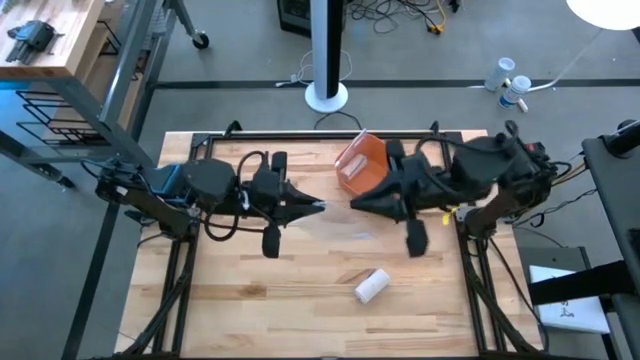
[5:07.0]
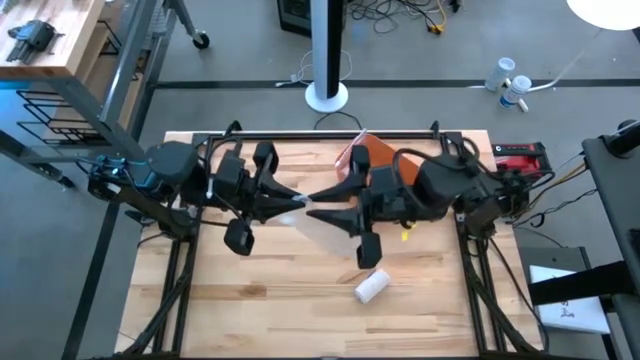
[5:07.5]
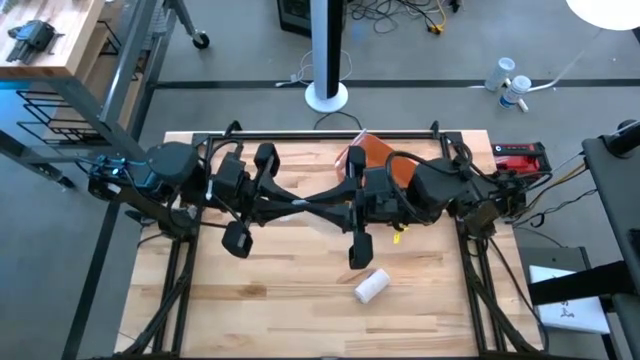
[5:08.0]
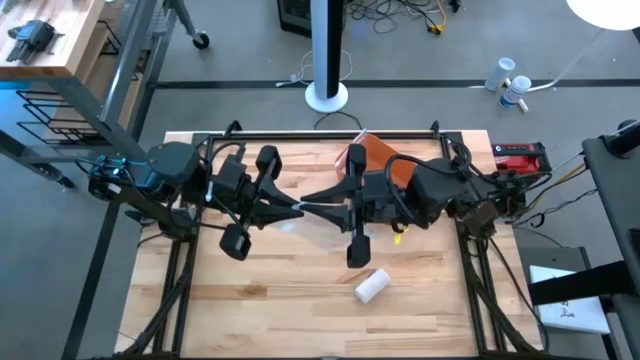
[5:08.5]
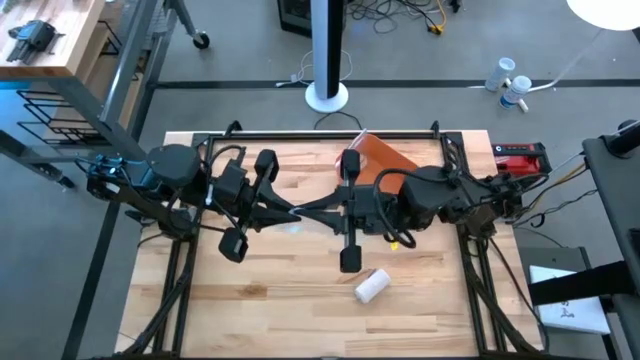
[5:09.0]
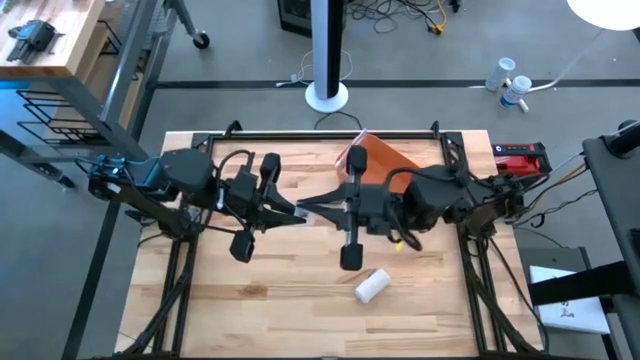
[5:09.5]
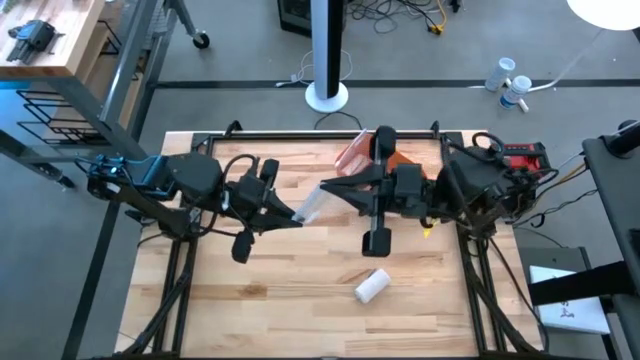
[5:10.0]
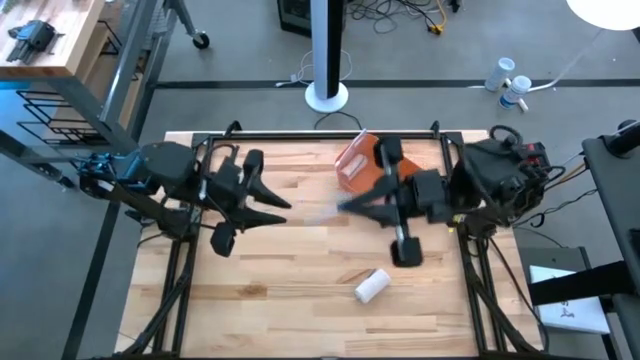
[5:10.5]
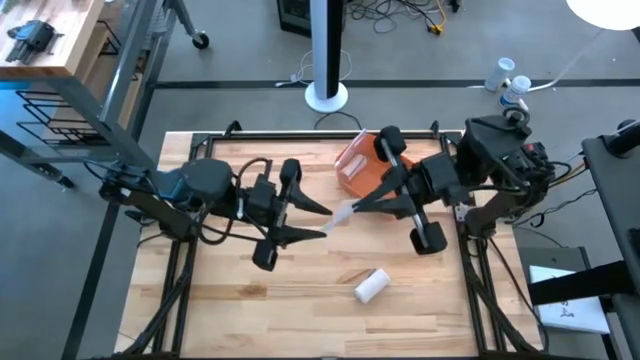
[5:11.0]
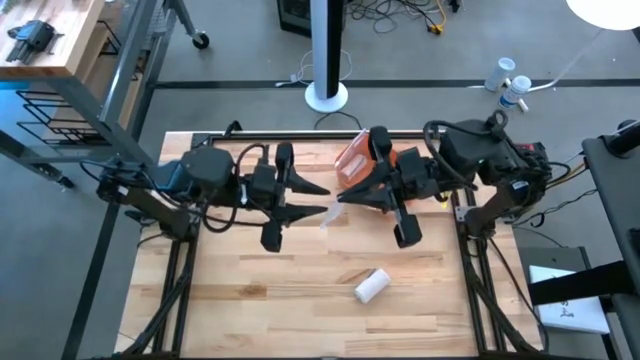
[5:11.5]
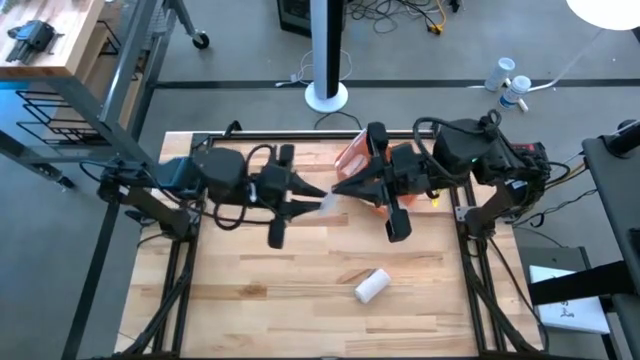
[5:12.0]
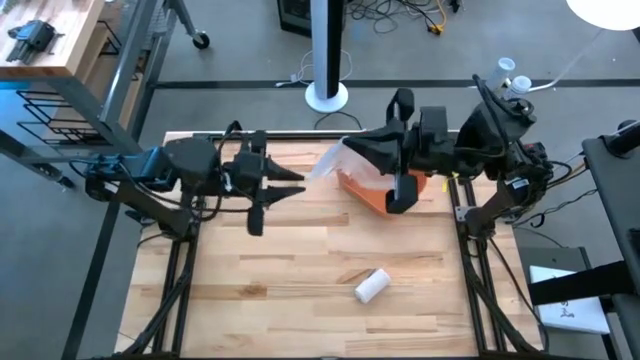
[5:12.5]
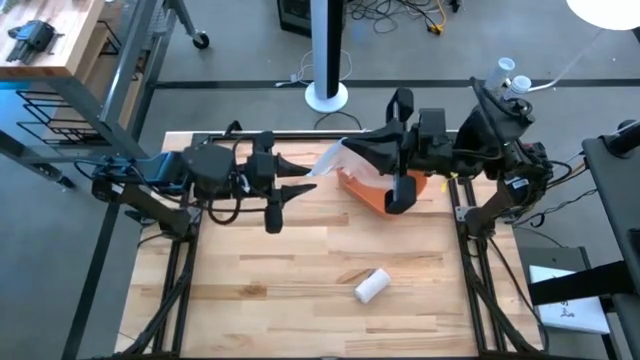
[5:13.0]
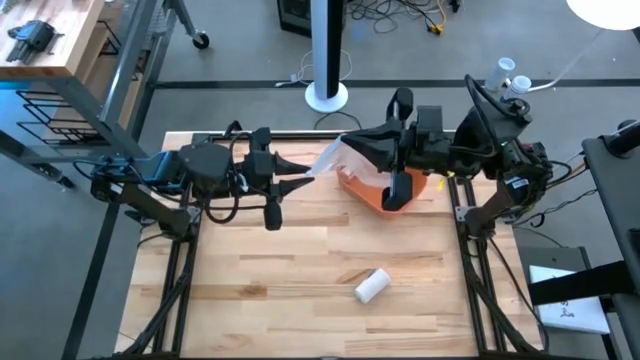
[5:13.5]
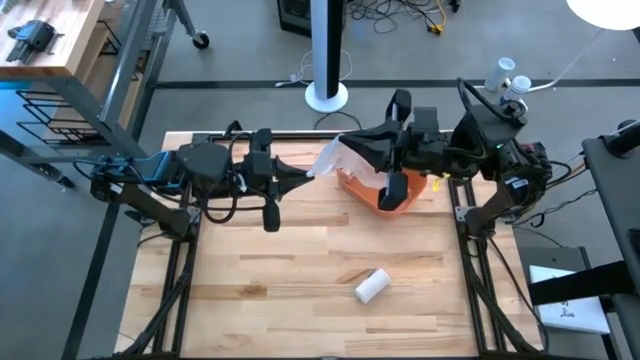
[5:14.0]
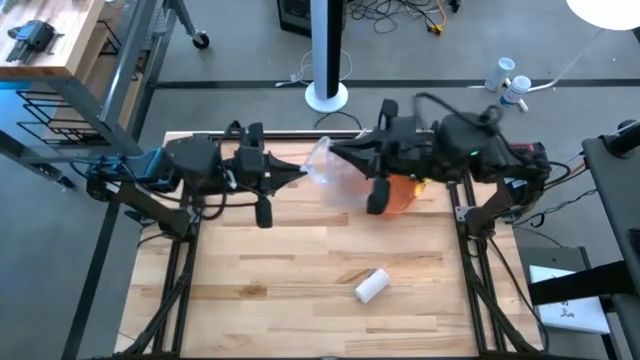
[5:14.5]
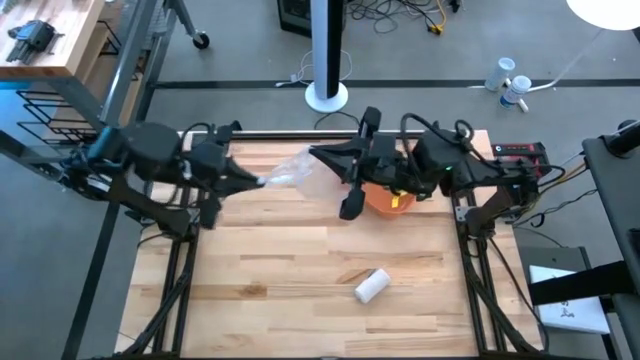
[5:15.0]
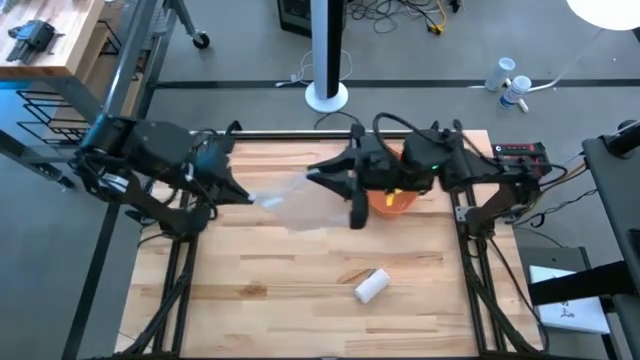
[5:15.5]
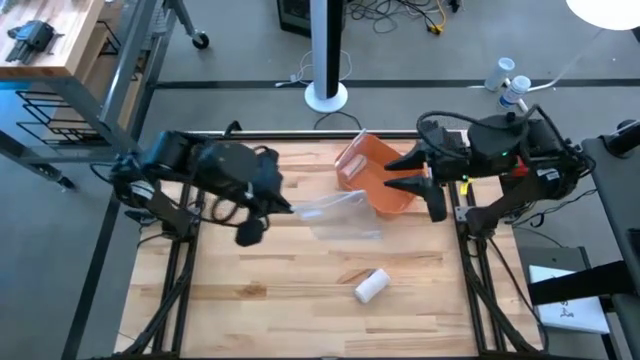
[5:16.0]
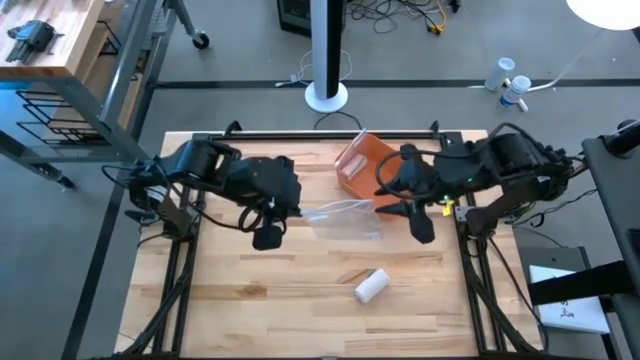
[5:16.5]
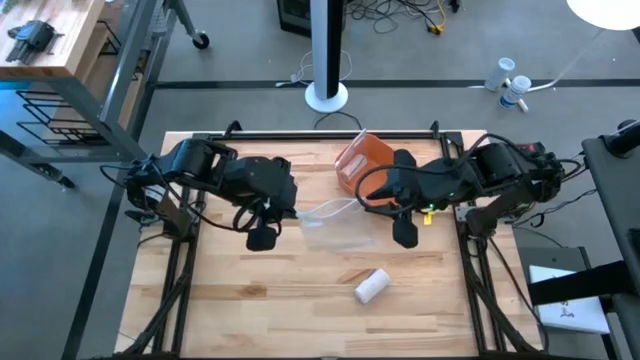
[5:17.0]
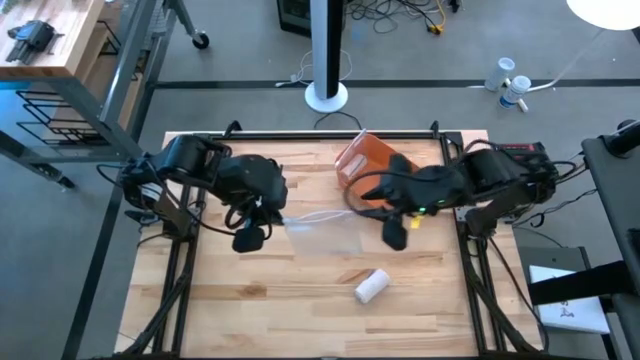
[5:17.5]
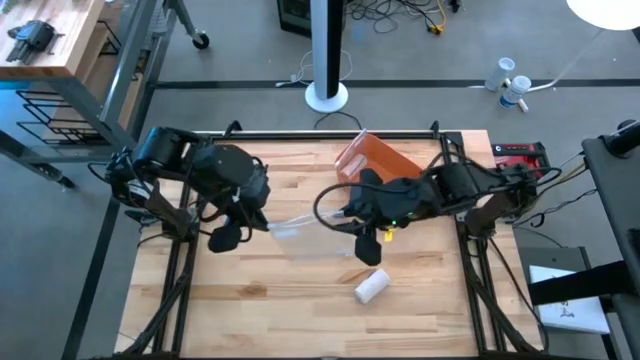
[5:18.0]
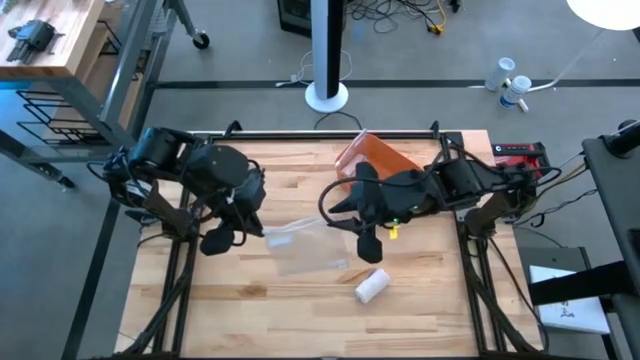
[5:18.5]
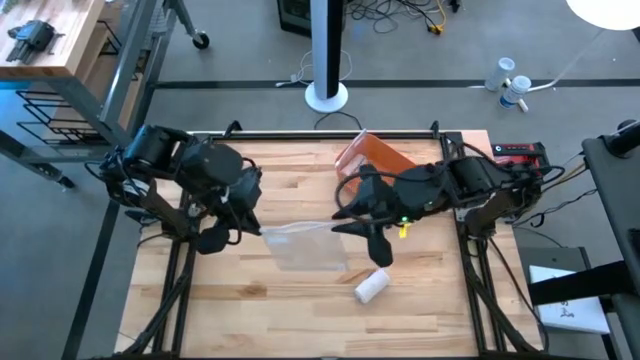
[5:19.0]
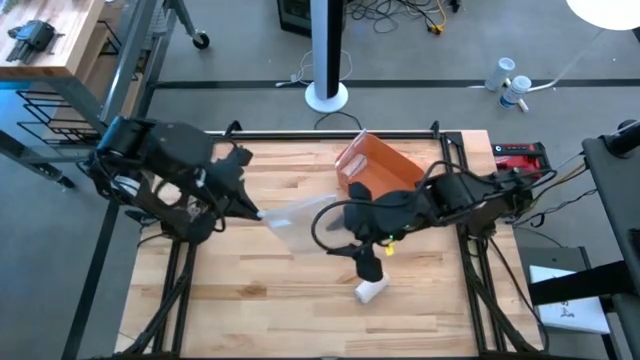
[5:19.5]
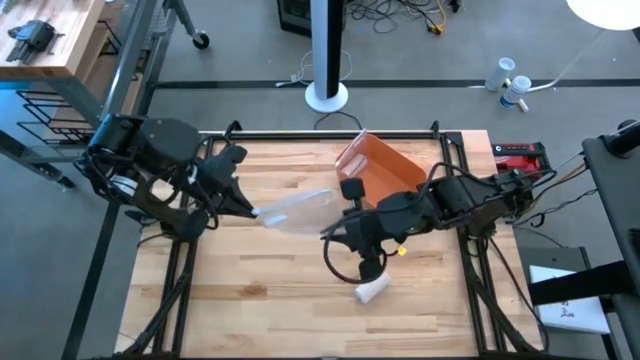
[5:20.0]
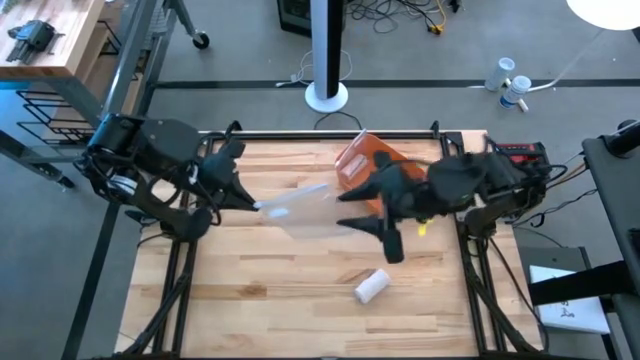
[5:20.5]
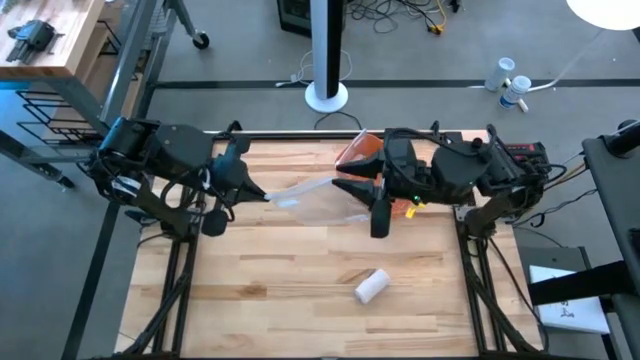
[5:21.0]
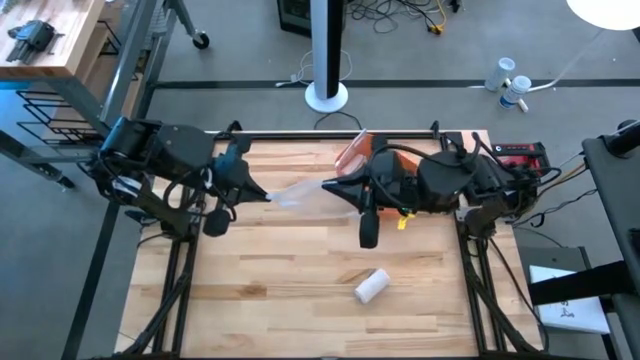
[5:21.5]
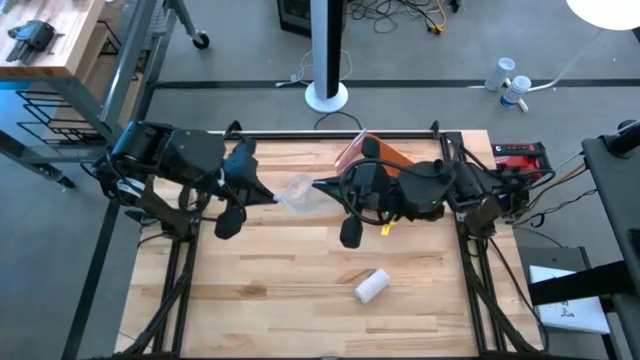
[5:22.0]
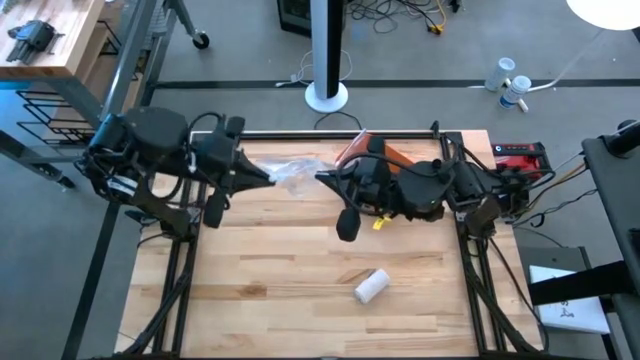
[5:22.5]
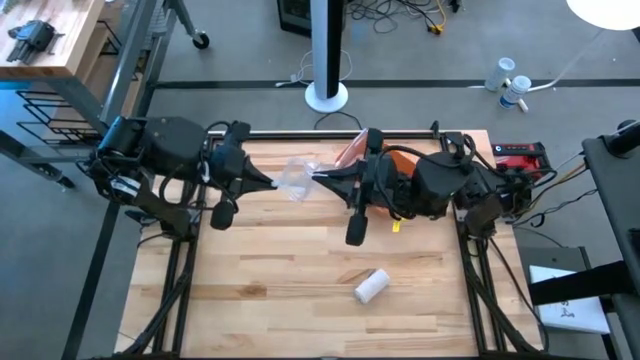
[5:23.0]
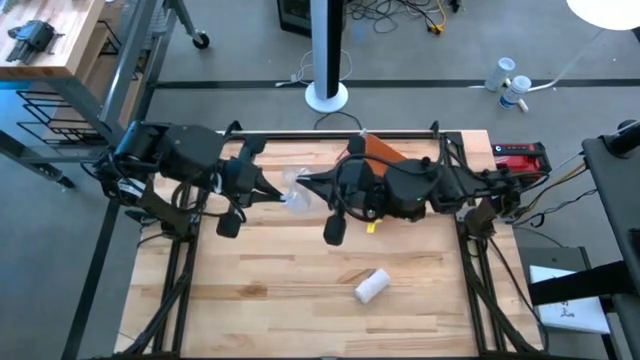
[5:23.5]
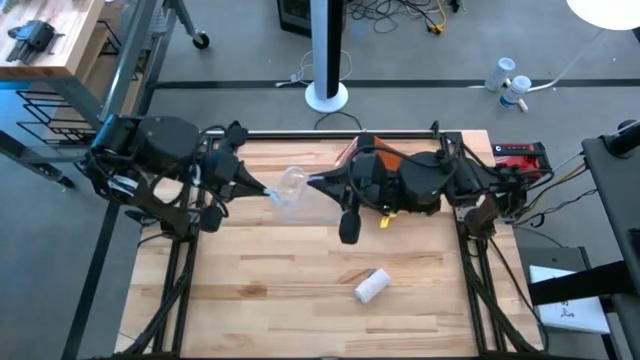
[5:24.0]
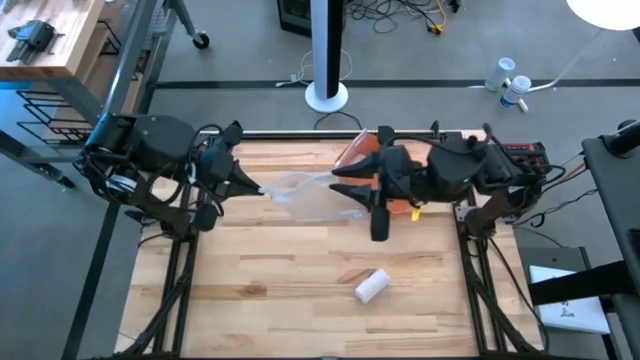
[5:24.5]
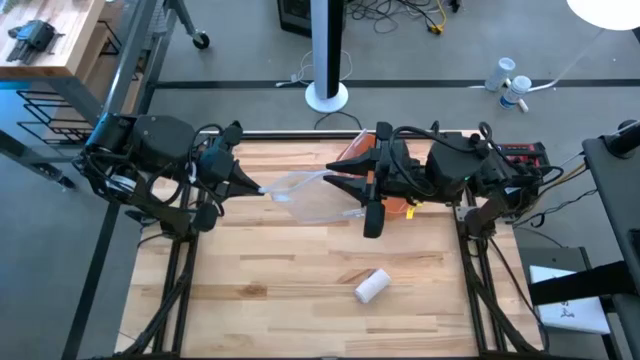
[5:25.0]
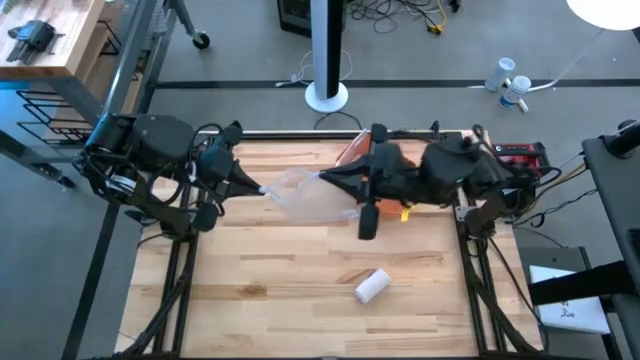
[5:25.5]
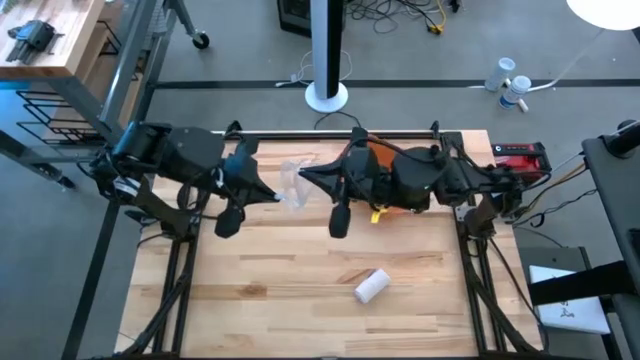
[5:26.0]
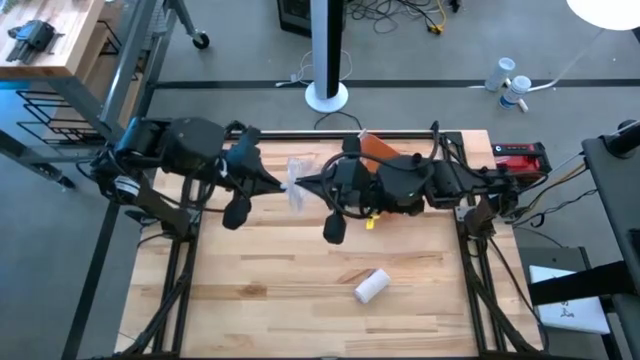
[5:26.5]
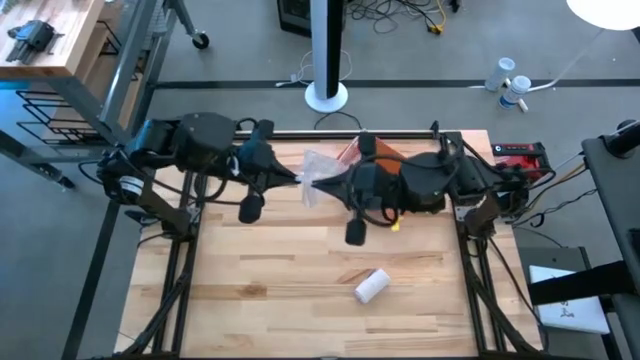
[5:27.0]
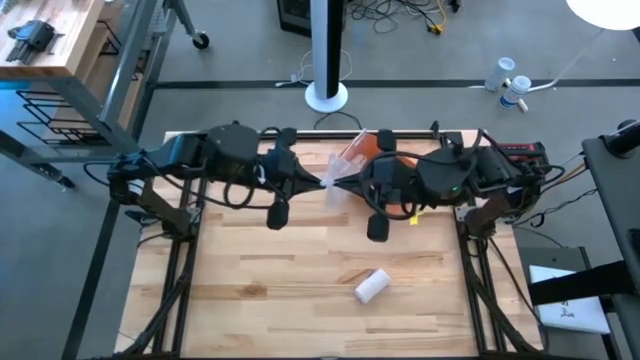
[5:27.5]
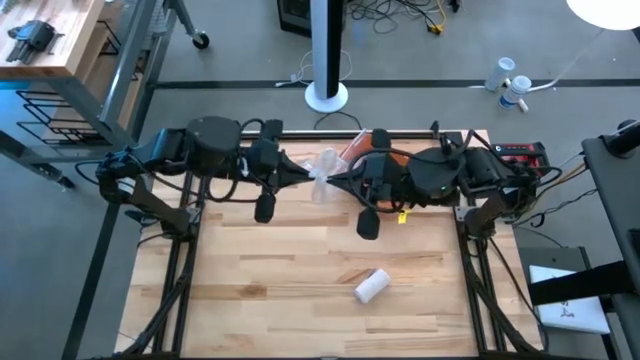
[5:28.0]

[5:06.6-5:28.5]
Task: Roll bandage
Open the transparent zip bag
